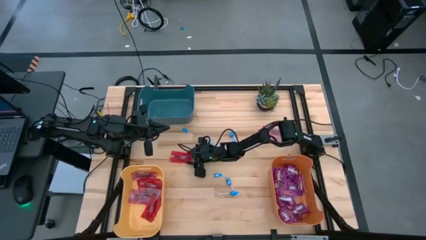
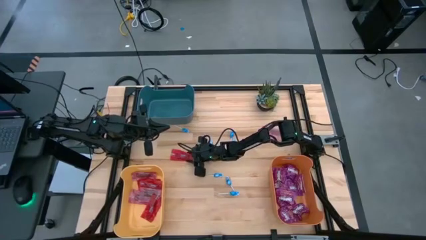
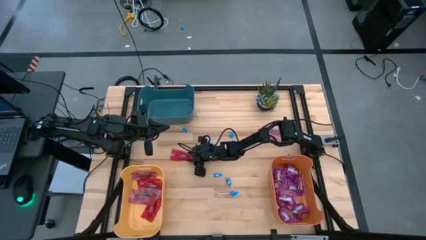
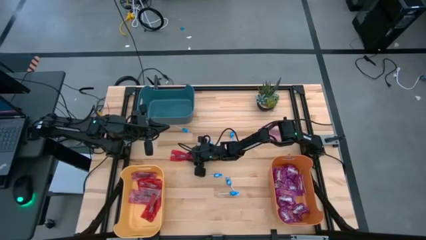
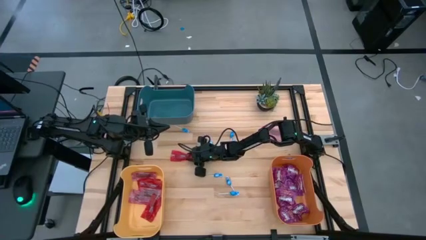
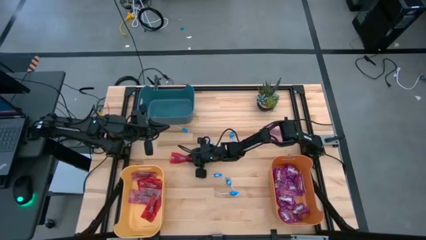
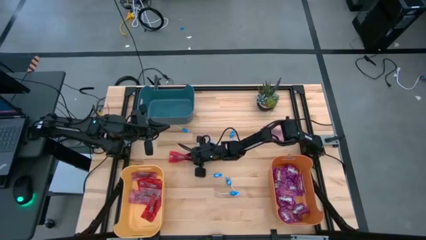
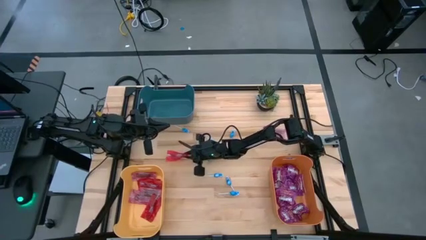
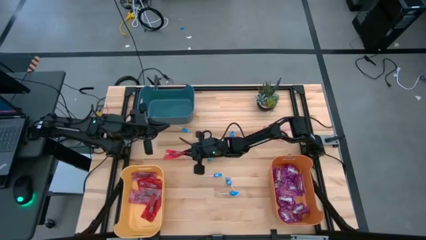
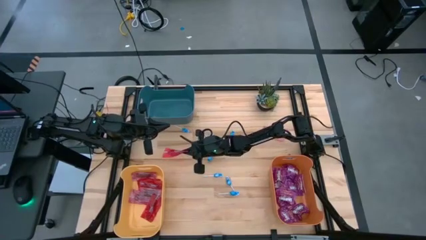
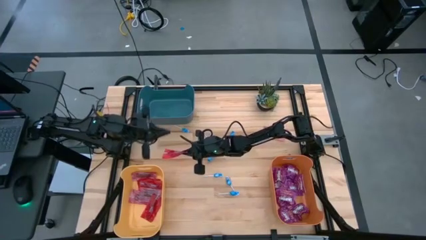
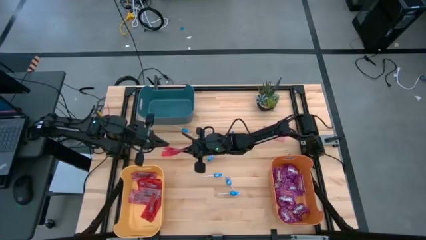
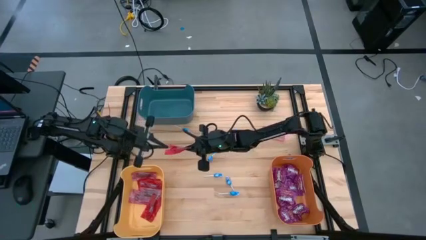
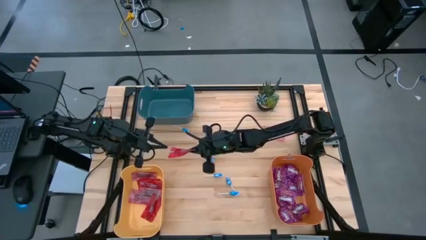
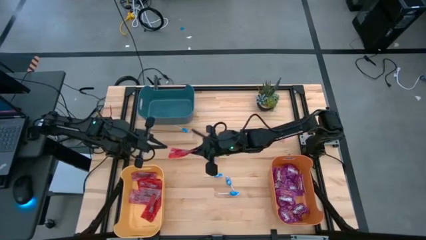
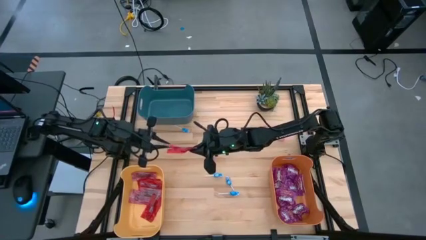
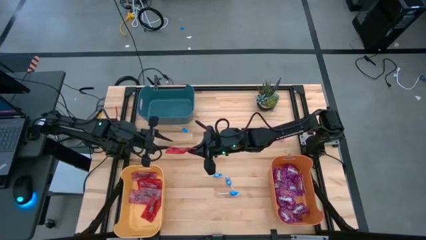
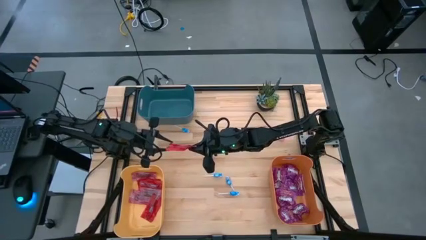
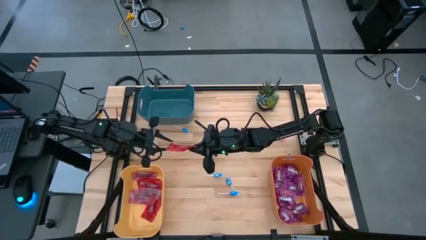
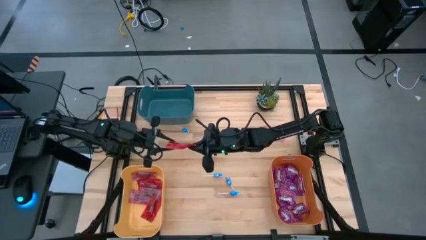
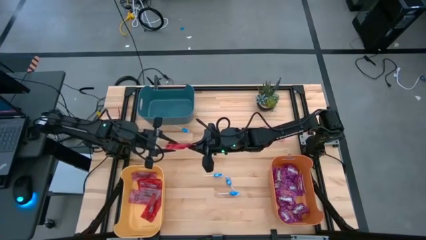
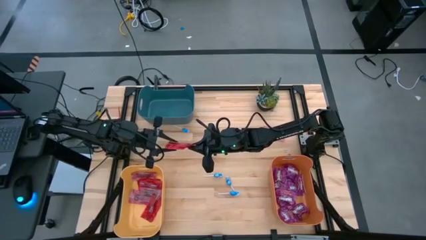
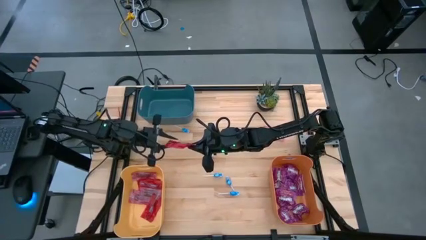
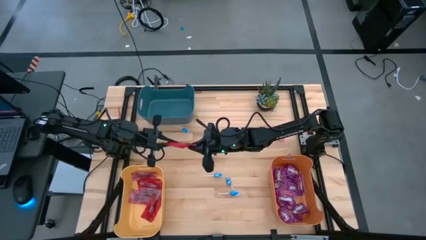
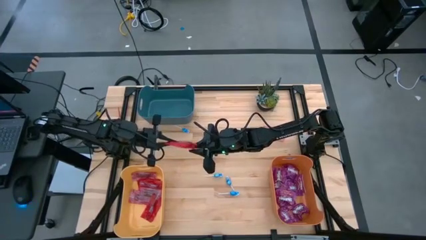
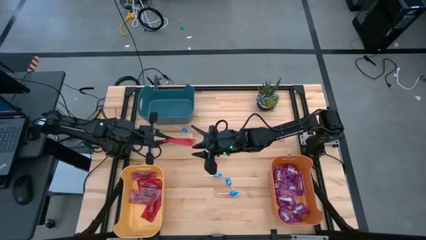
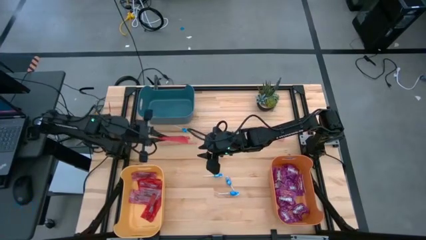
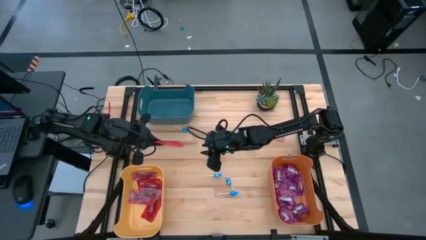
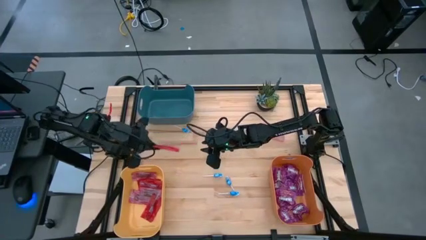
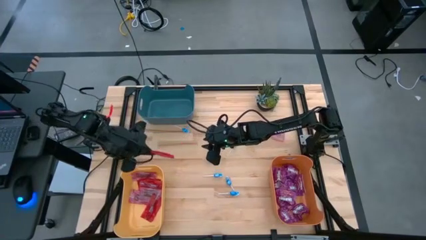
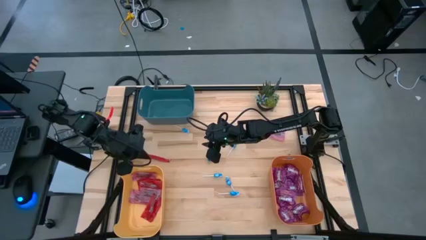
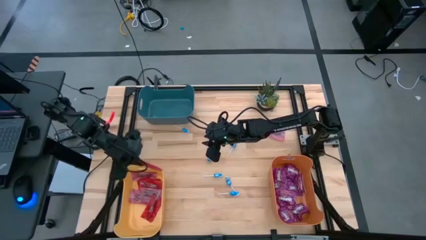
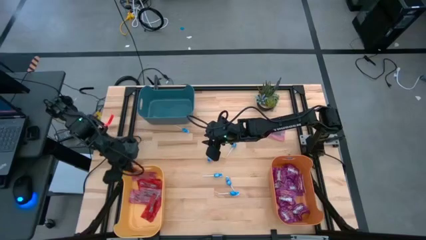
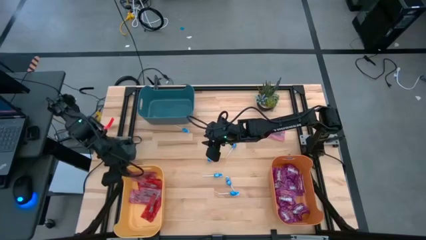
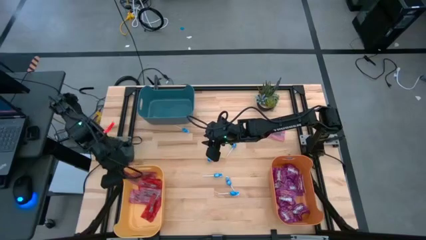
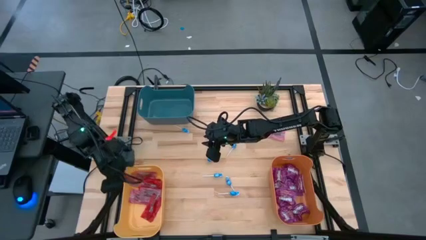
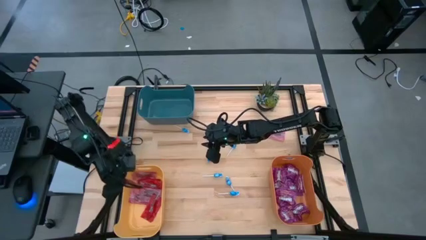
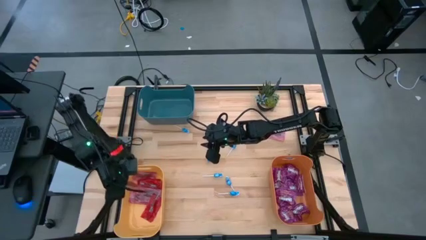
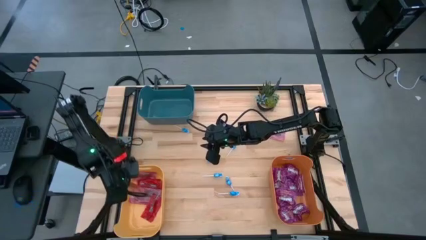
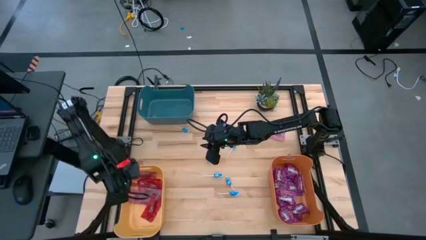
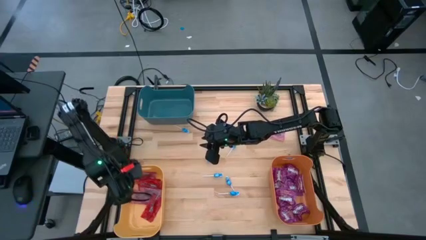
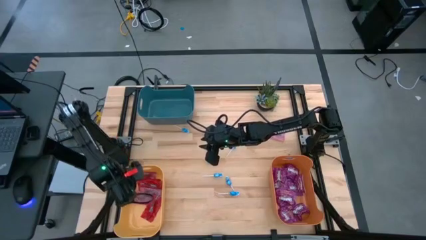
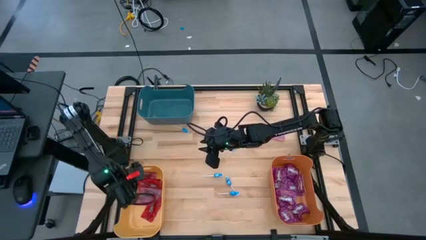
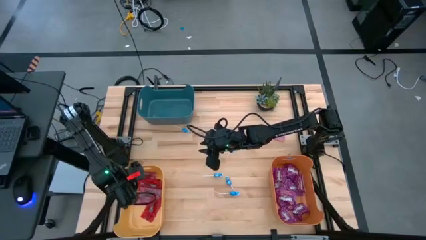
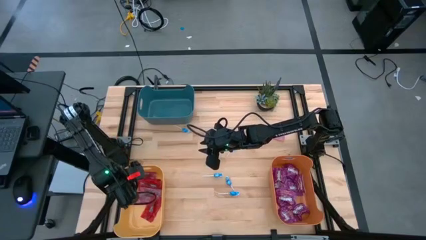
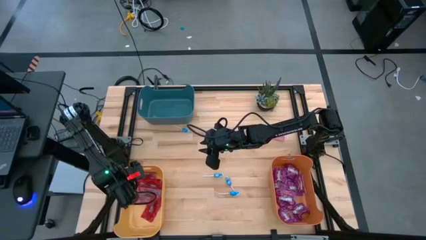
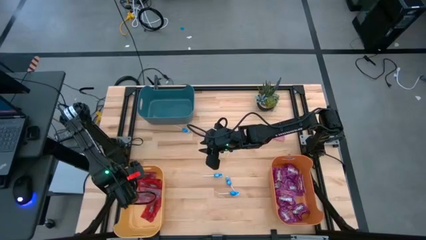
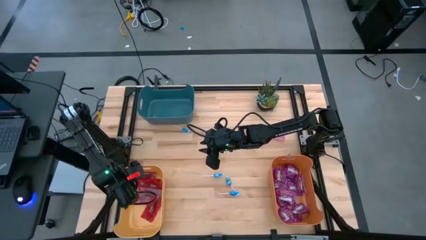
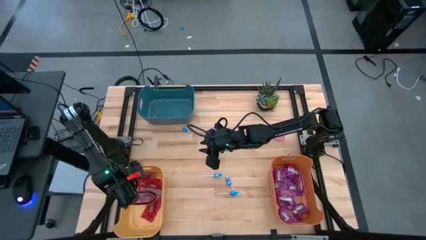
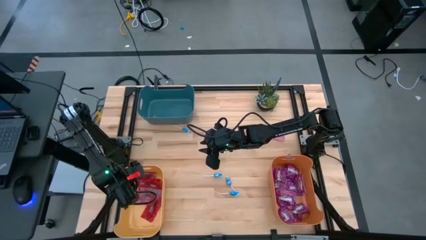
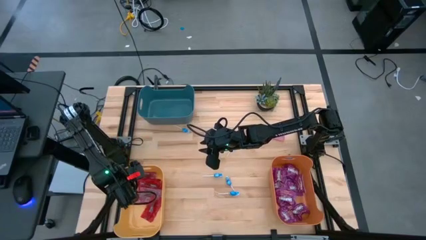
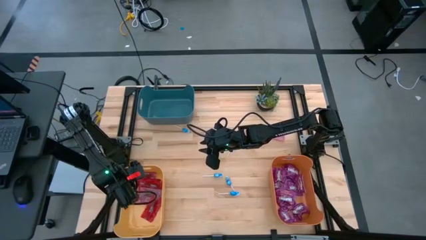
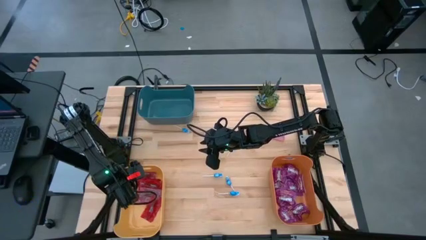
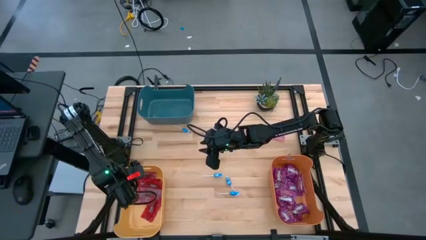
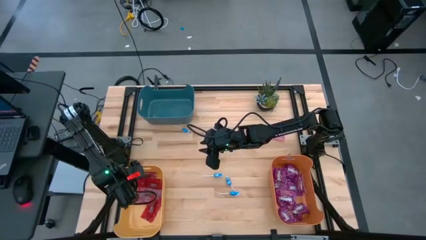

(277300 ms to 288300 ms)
Task: Sort candy
Put the red candy into the yellow bin

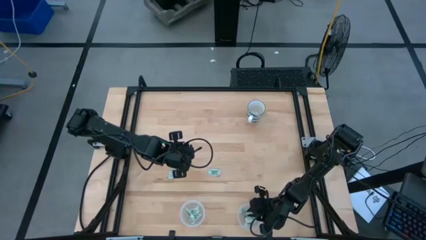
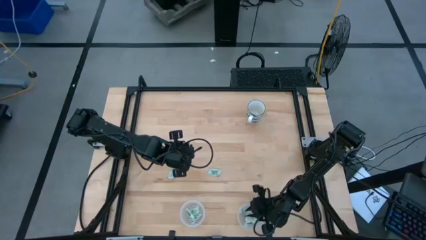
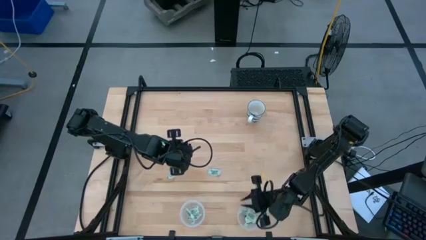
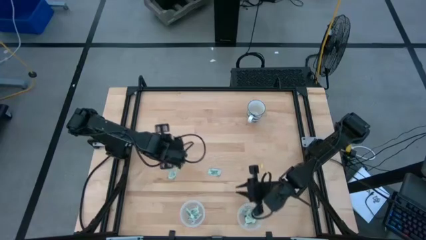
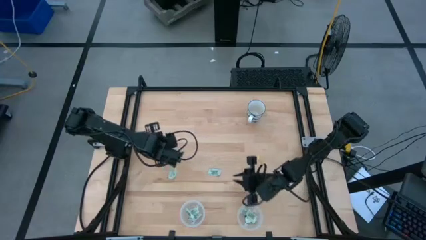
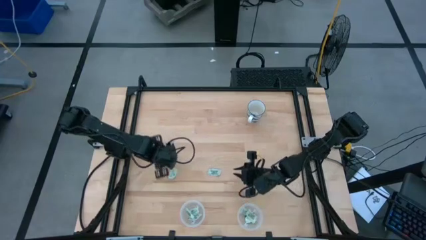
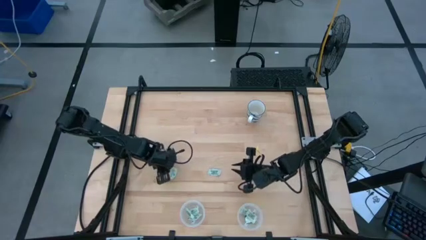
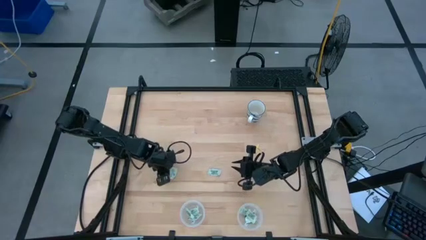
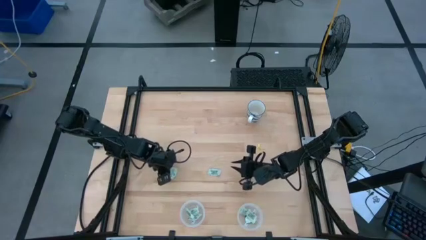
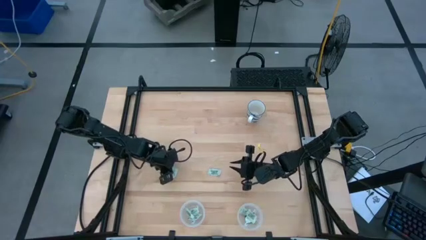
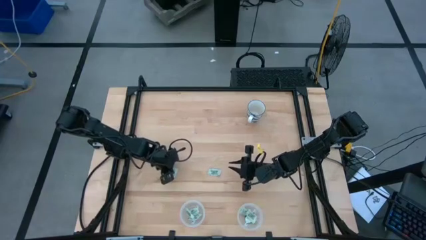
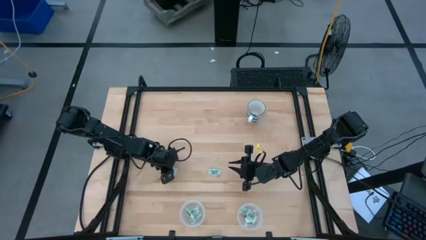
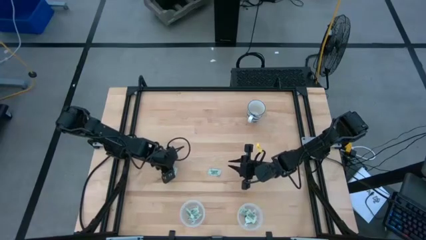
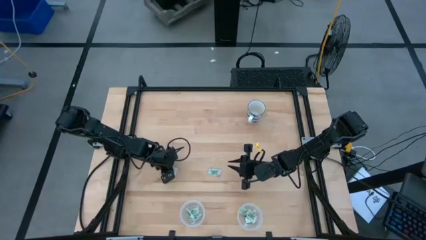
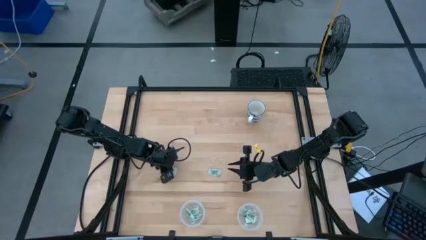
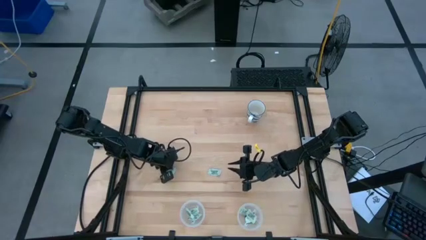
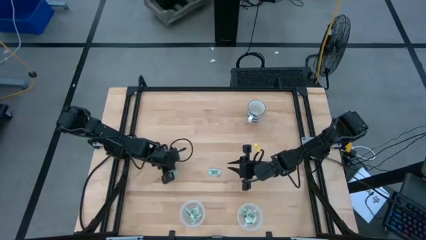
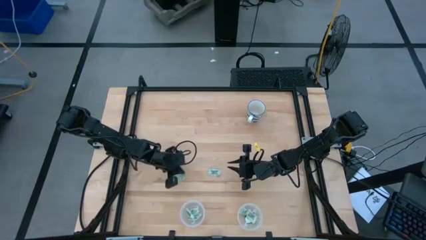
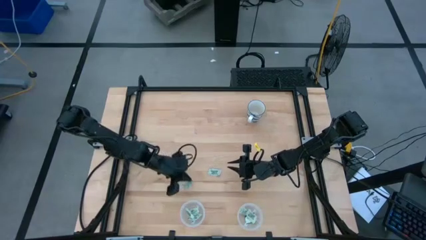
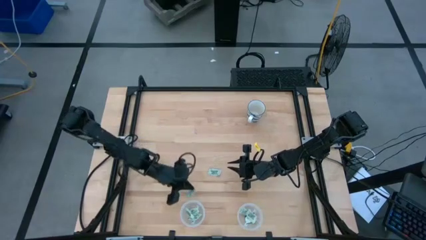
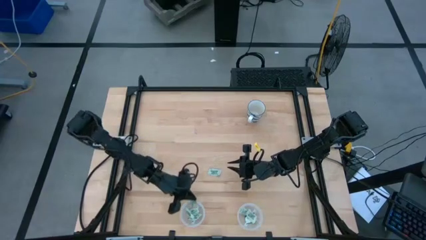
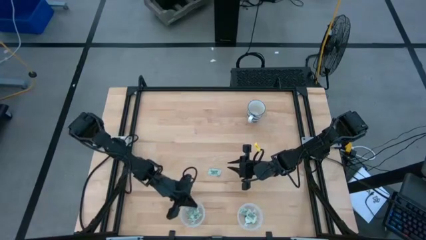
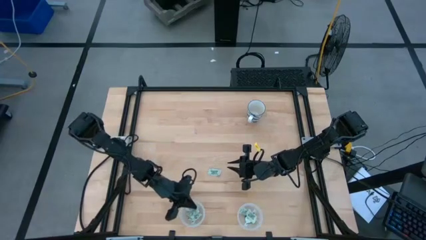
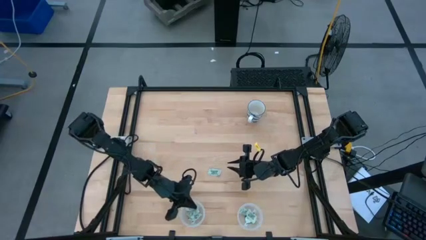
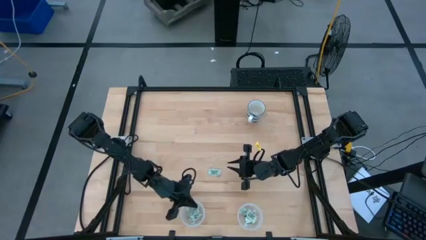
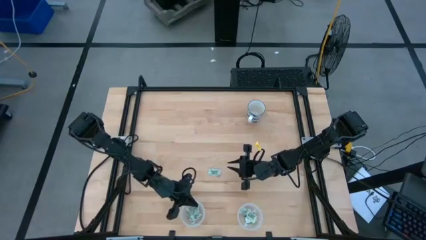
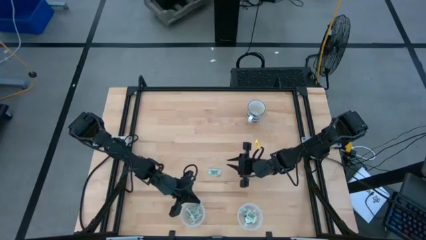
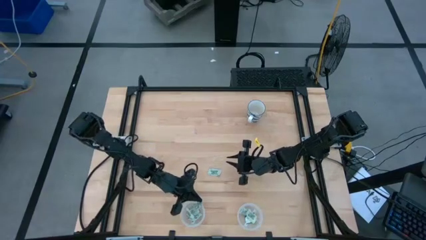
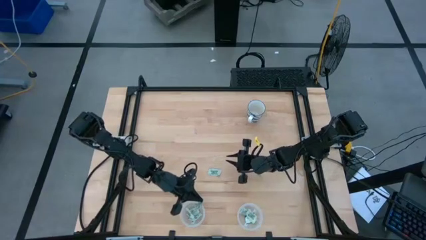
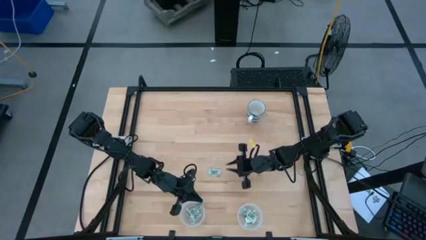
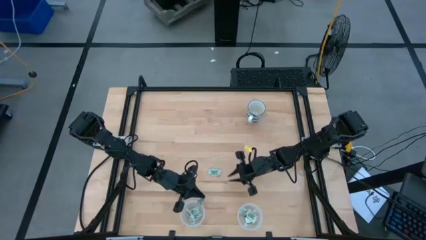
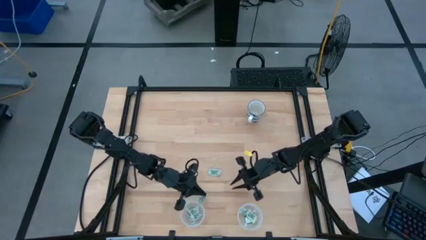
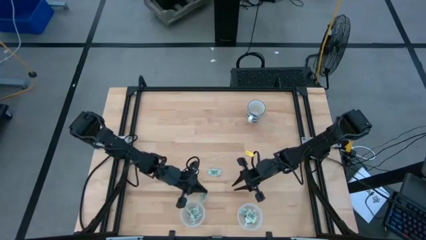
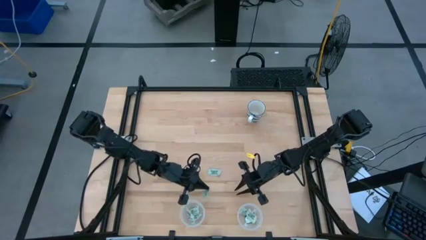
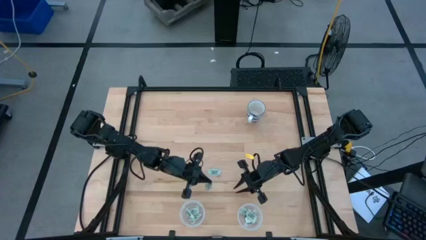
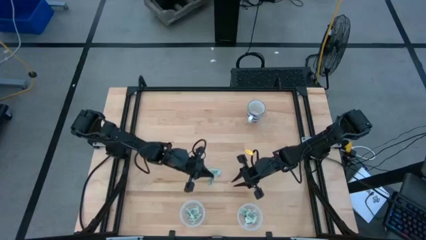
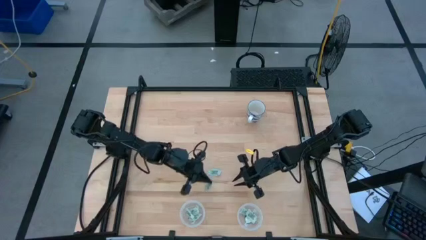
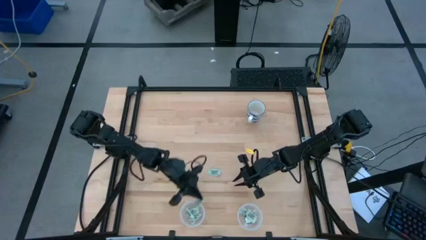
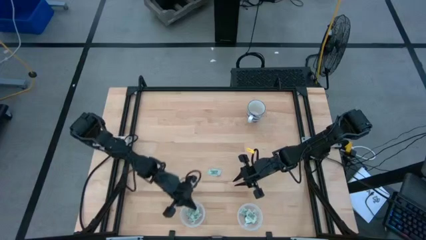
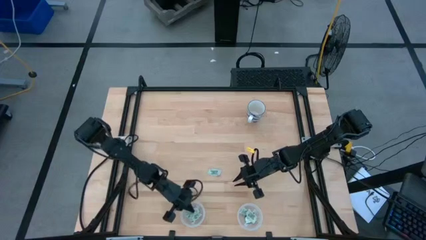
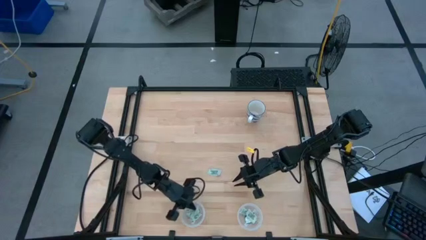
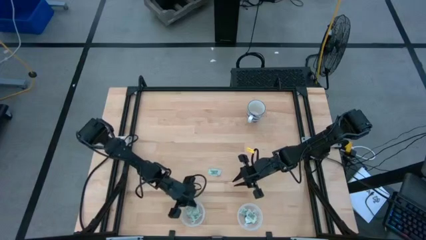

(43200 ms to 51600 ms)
Task: Pick and place Stevia / Truvia into bins
Put the white stevia packet into the left transparent container
